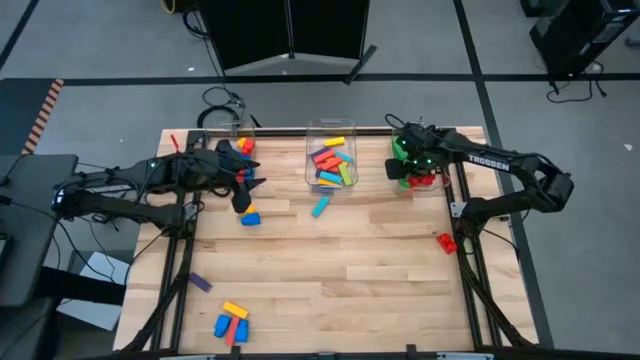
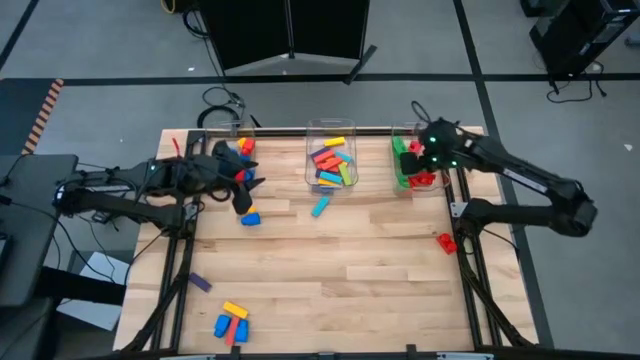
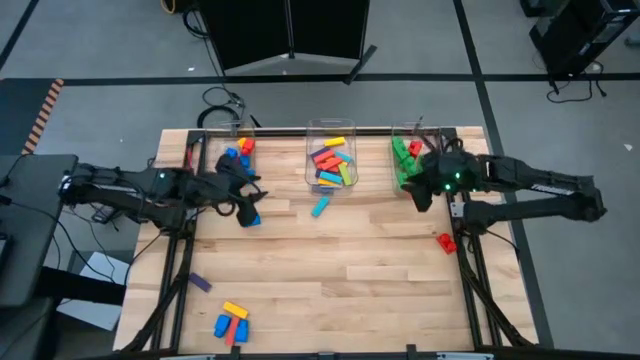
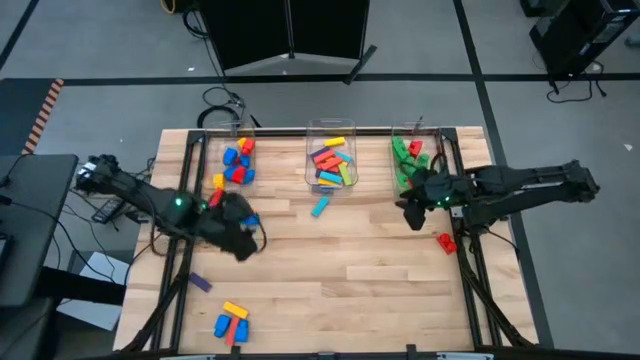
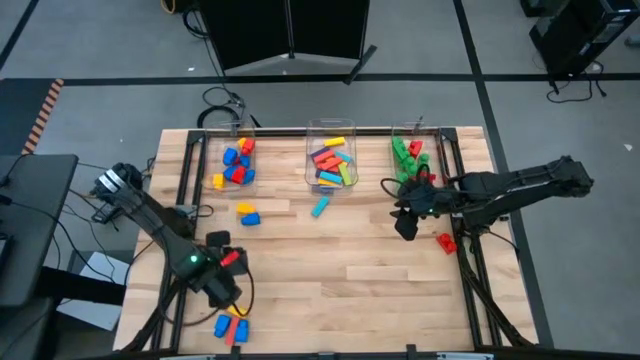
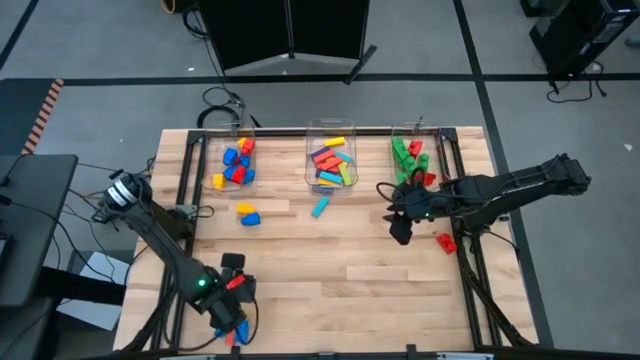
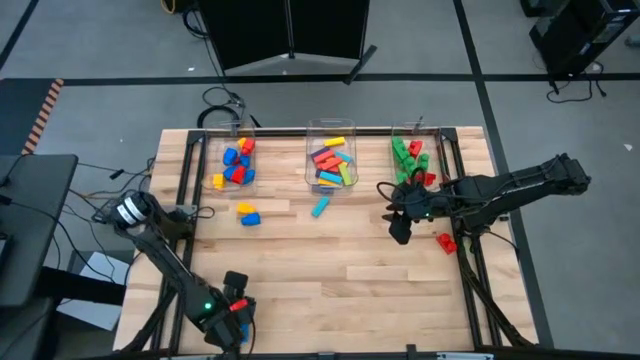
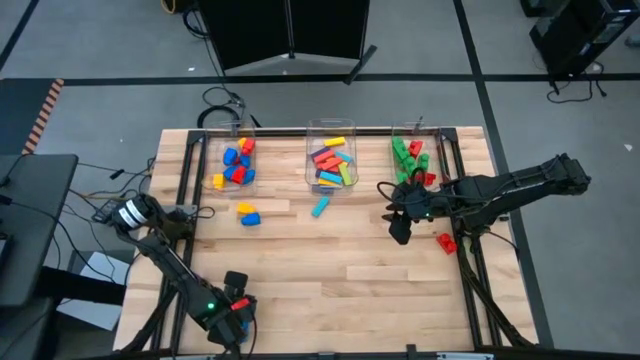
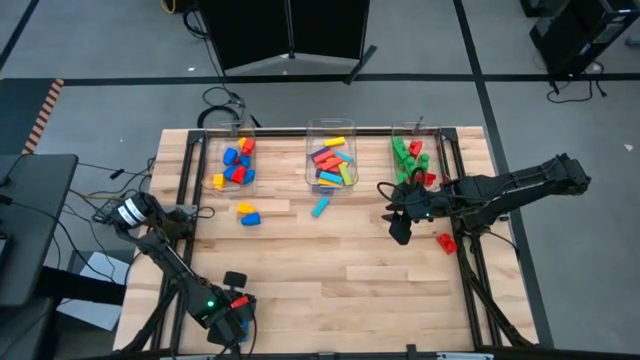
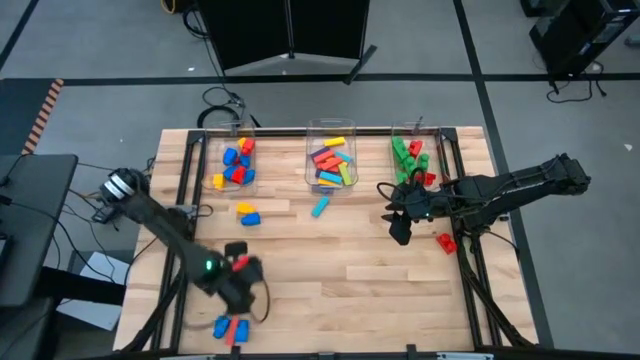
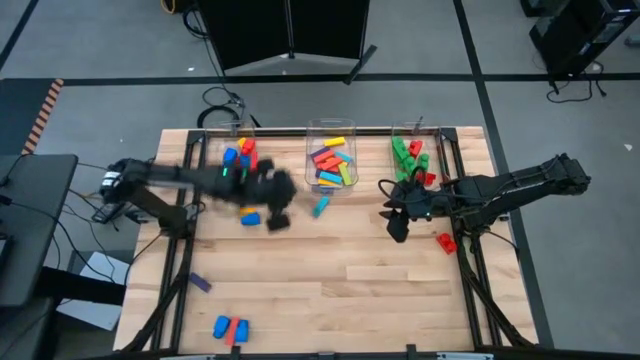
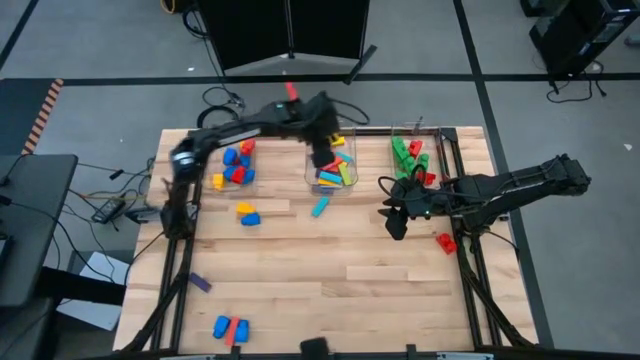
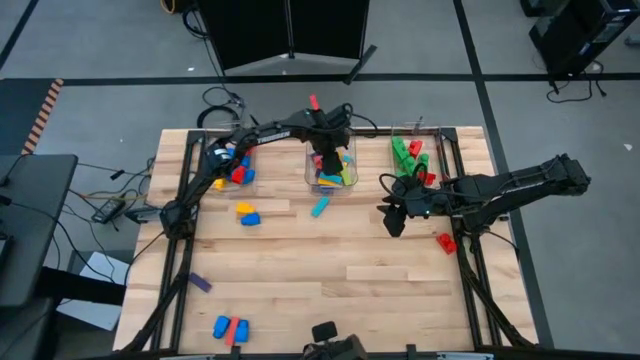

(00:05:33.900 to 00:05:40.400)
Task: Sort blocks by size
Put the yellow block into the middle transparent bin

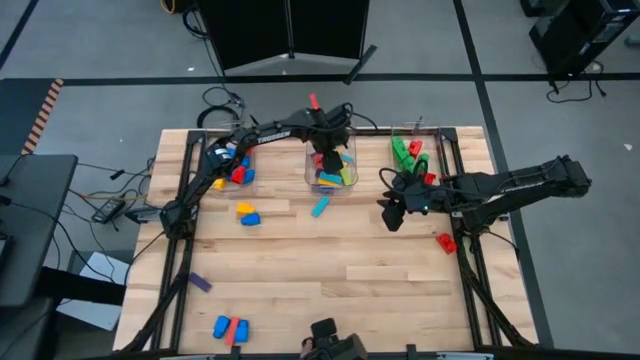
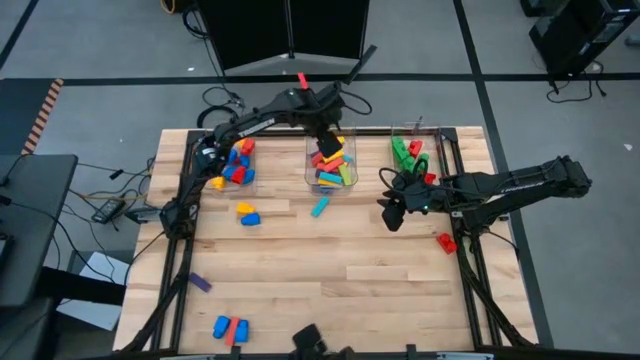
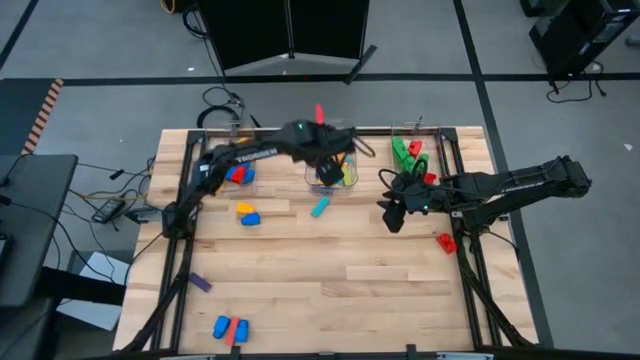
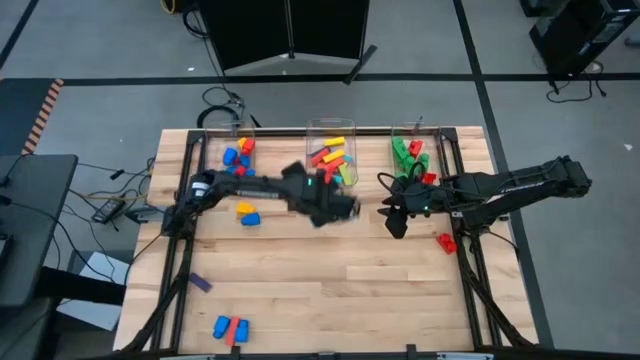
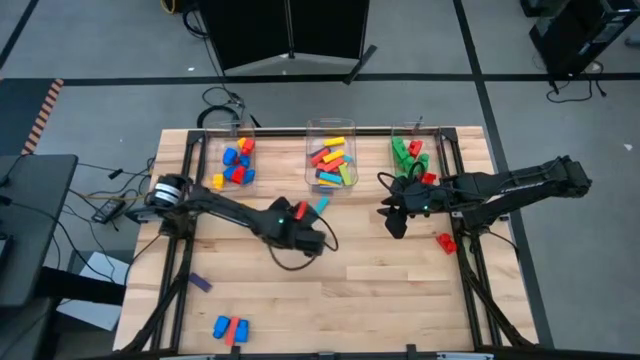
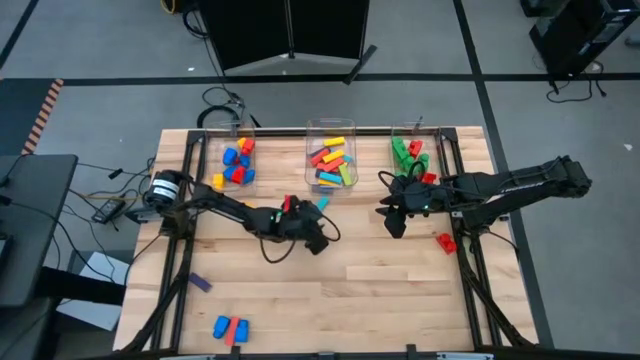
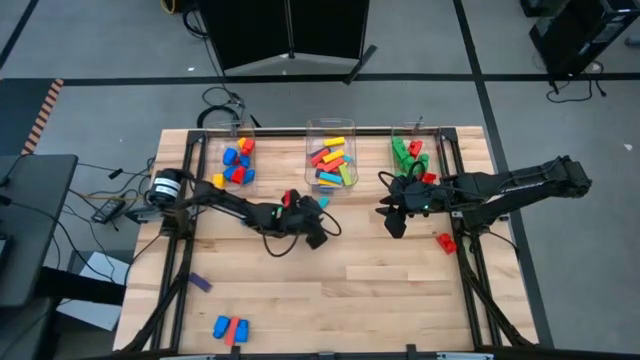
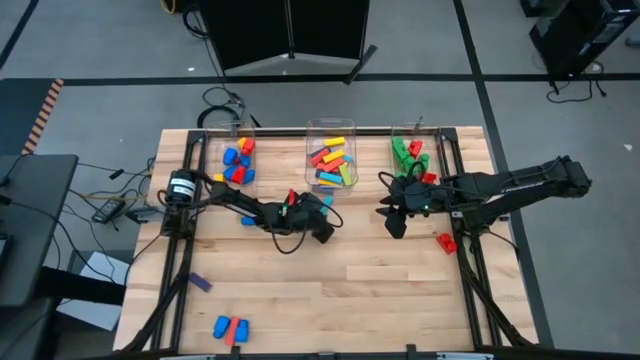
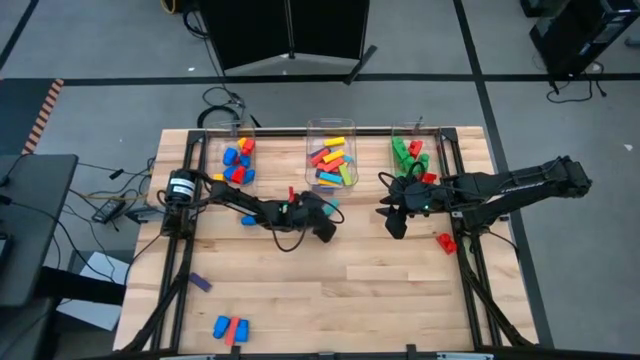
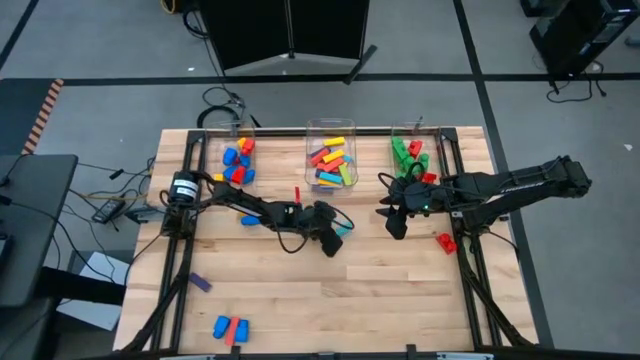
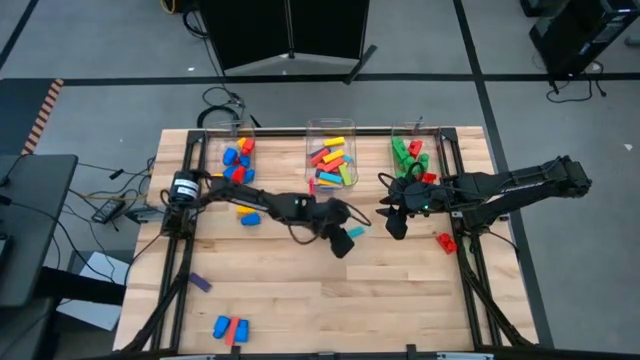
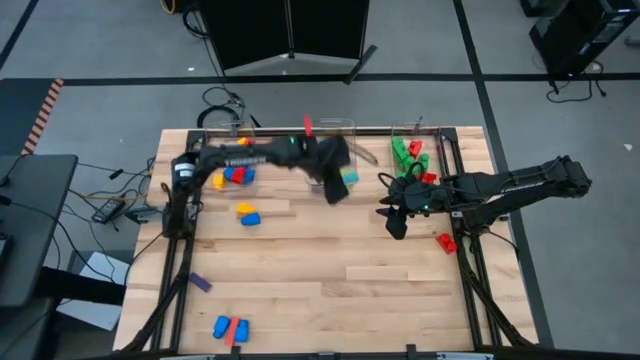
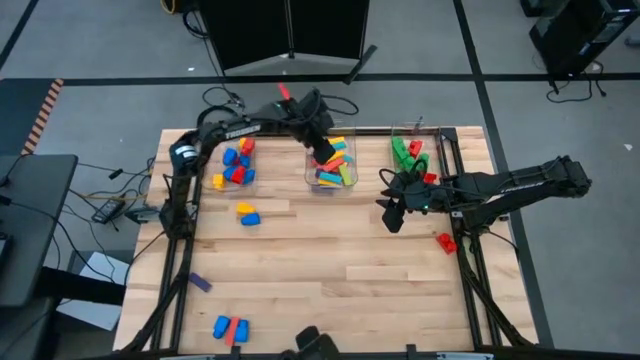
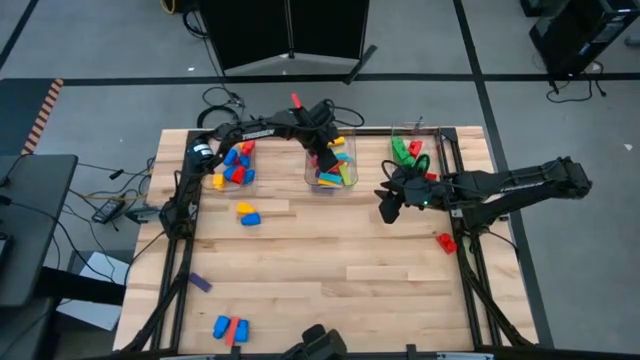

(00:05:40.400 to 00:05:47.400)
Put the blue block into the middle transparent bin

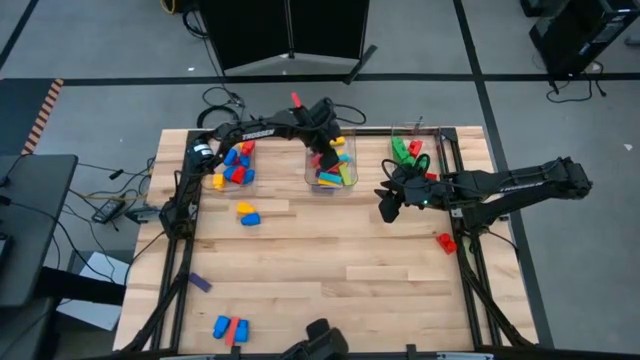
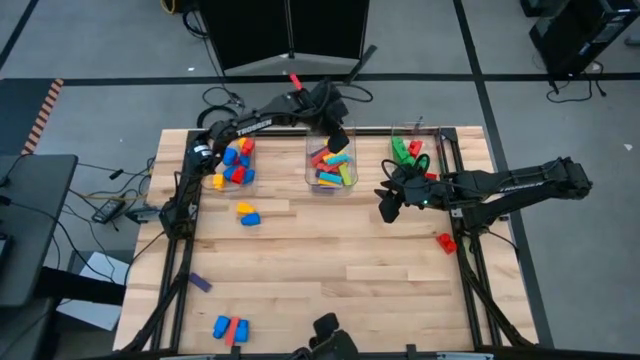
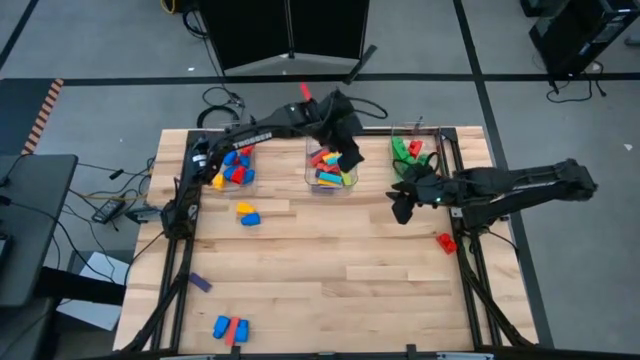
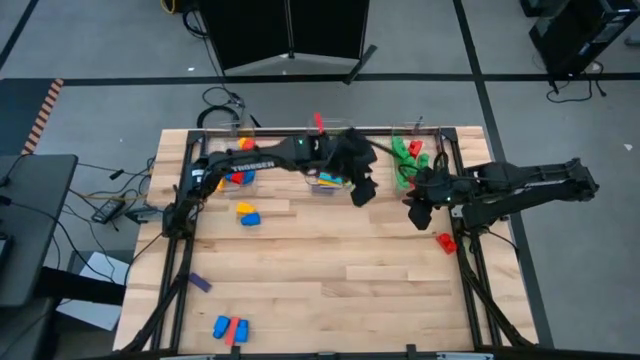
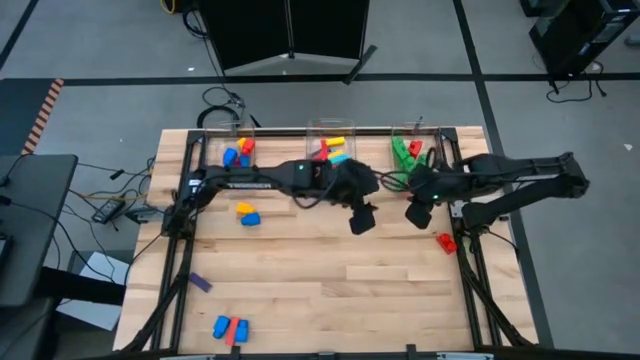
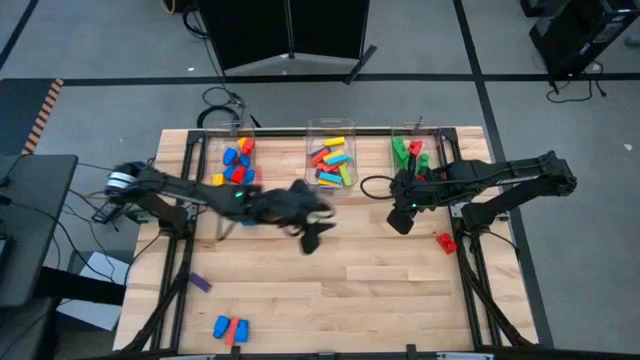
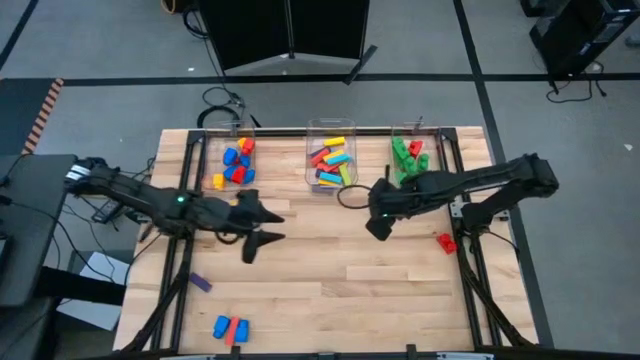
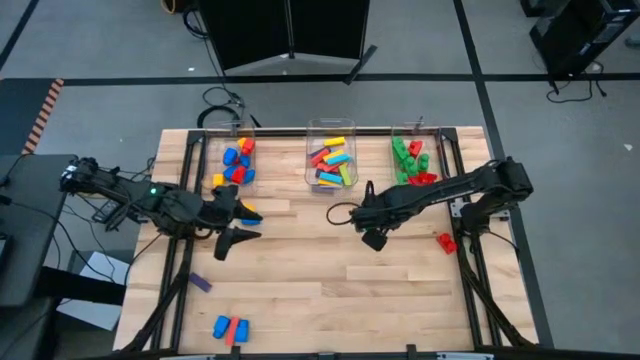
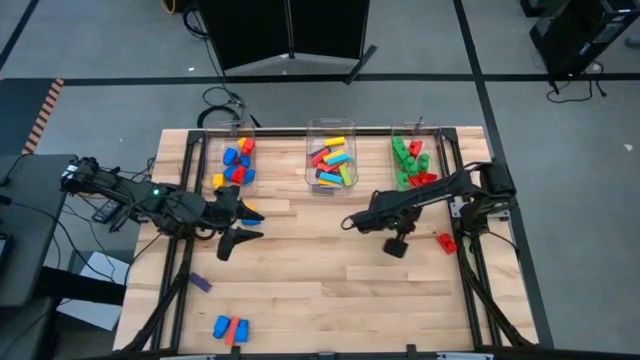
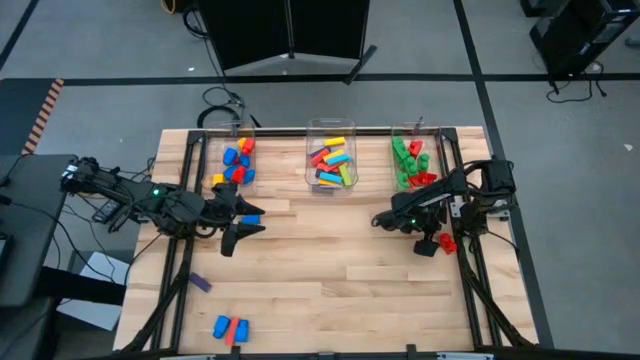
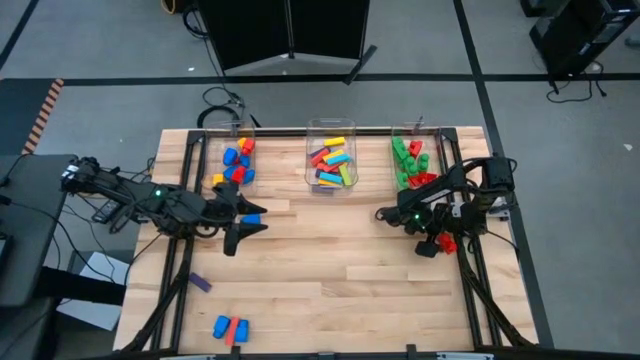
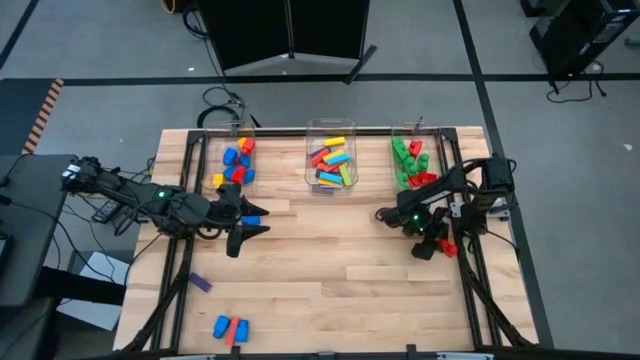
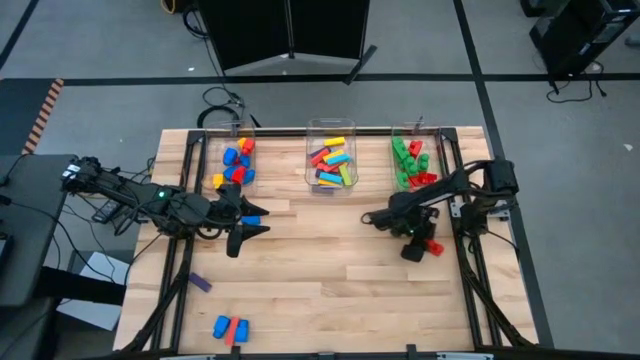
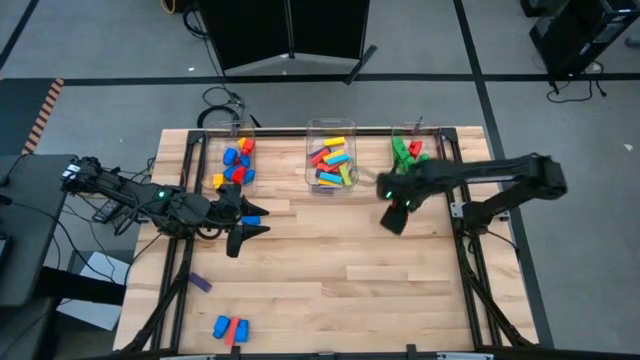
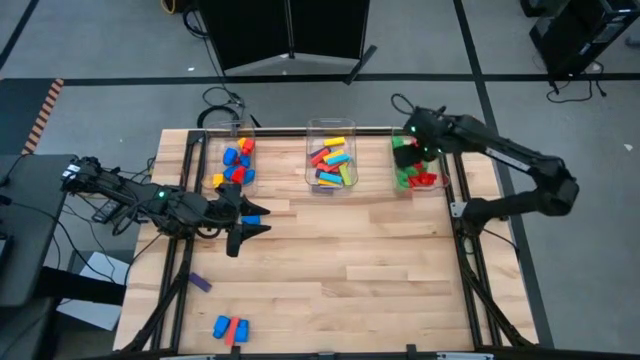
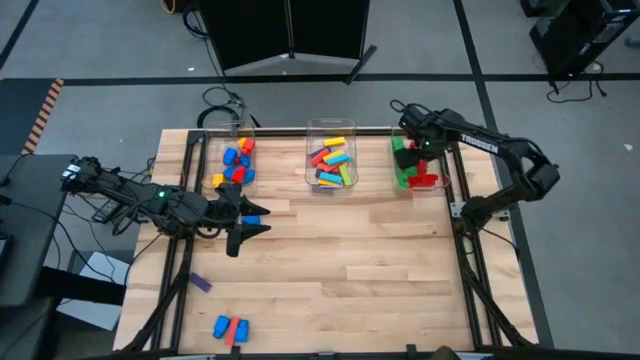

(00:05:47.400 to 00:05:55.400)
Put the red 2 stud game piece into the right transparent bin
